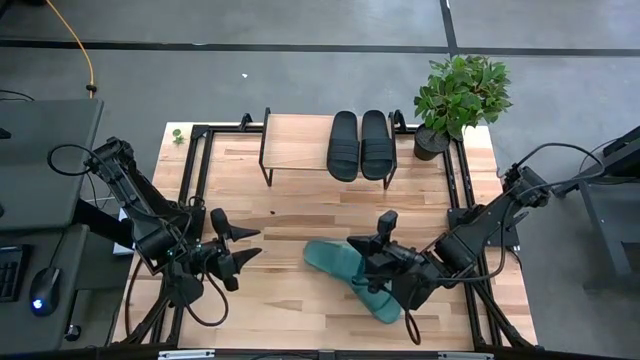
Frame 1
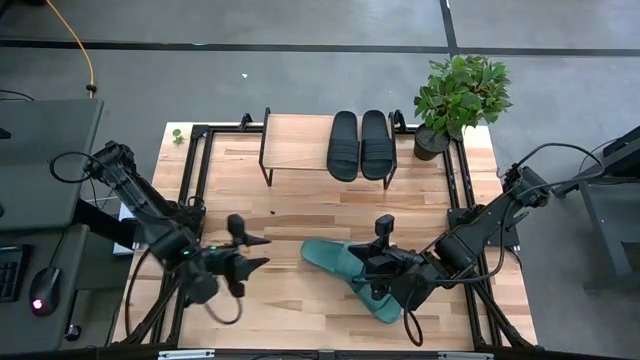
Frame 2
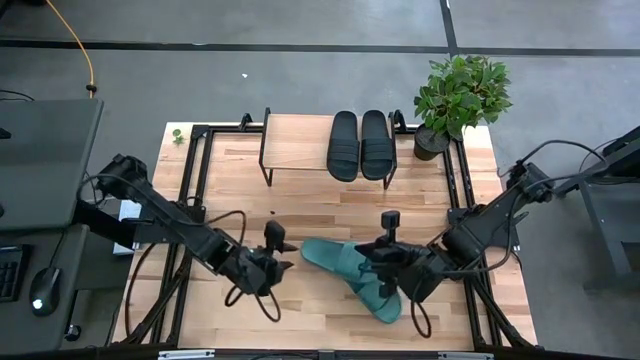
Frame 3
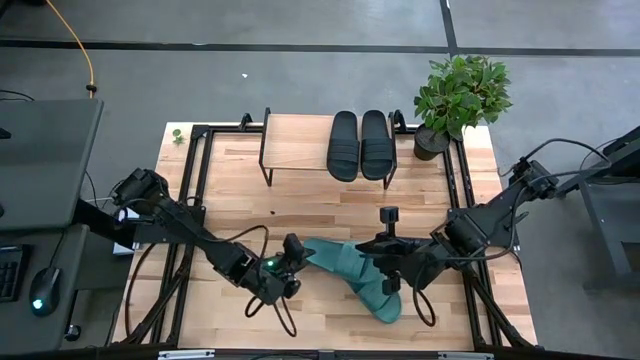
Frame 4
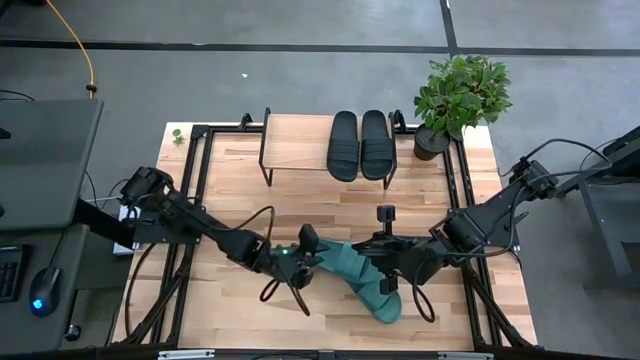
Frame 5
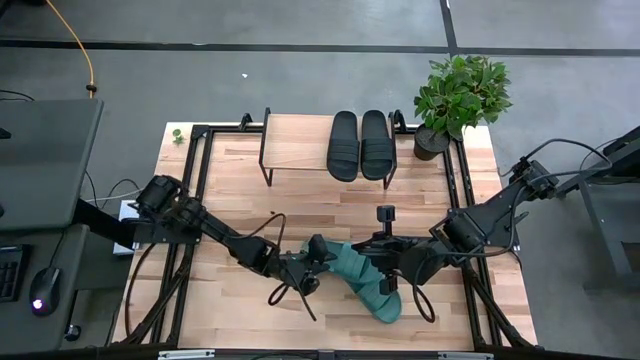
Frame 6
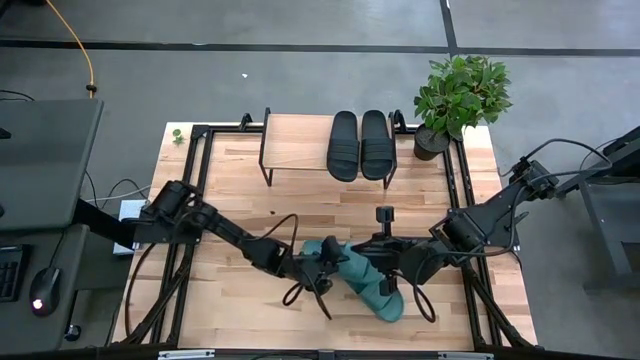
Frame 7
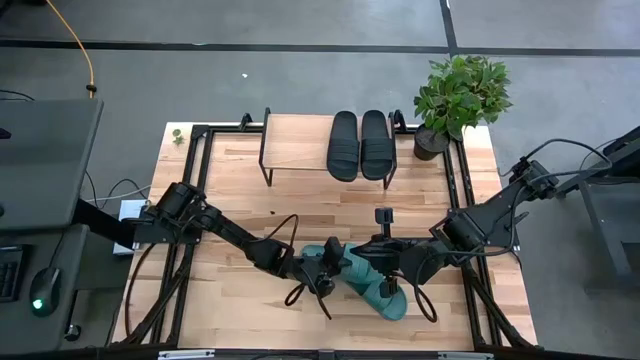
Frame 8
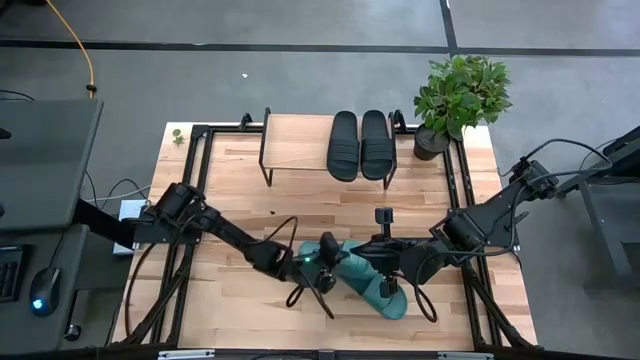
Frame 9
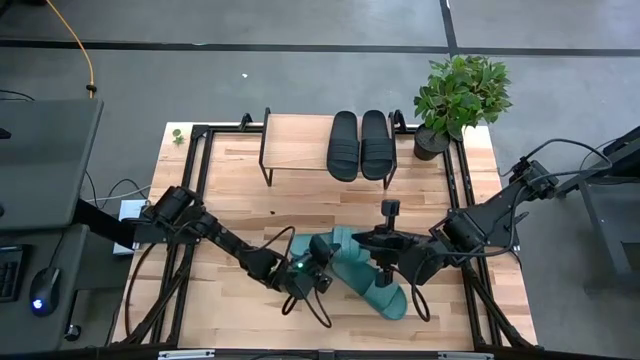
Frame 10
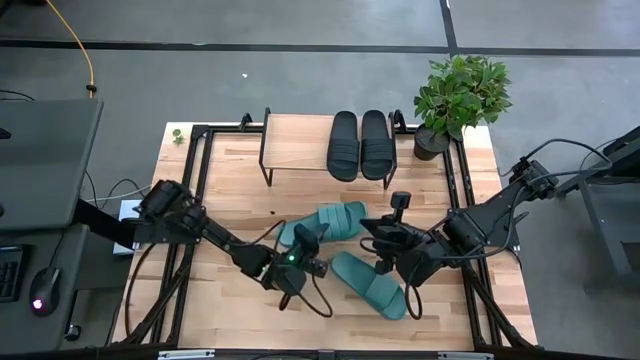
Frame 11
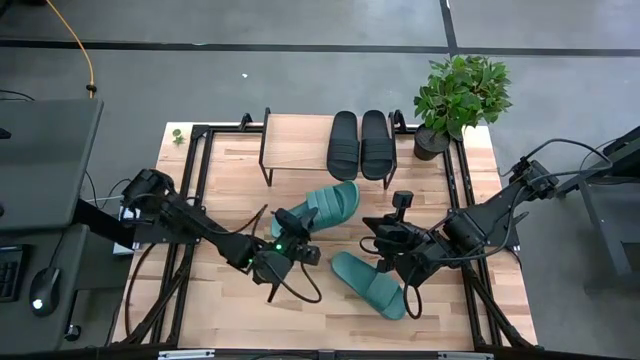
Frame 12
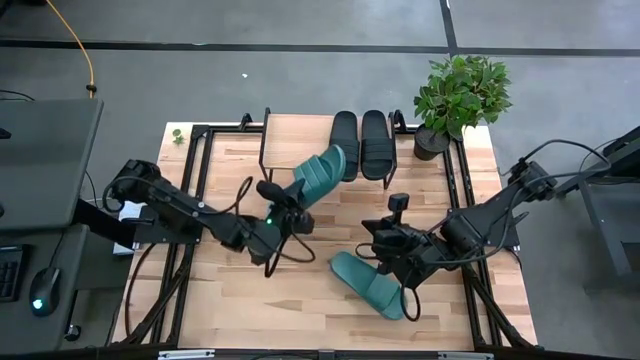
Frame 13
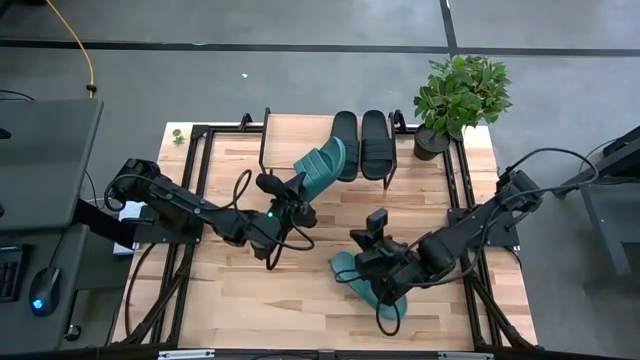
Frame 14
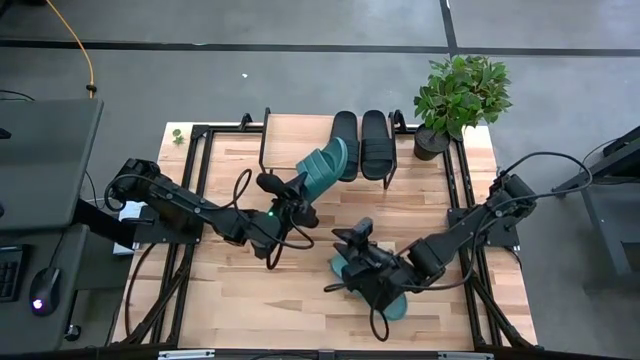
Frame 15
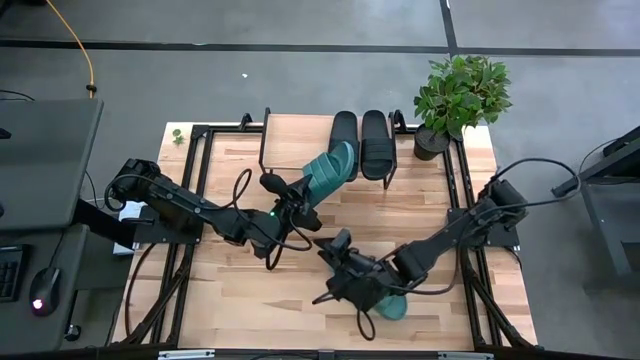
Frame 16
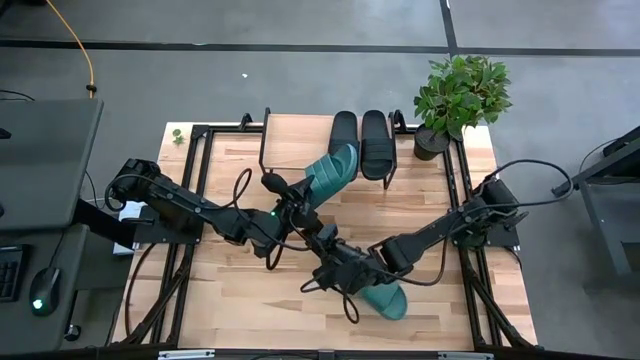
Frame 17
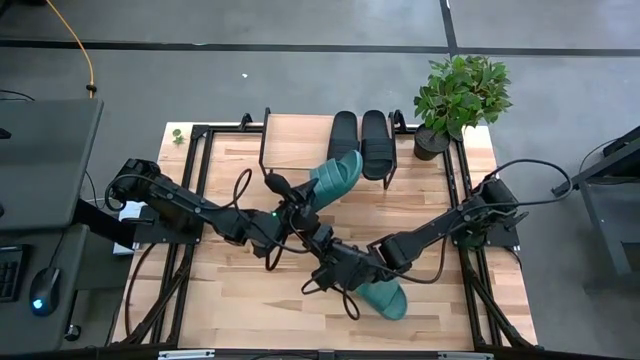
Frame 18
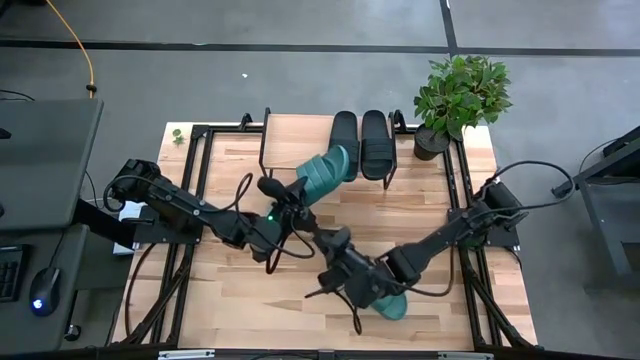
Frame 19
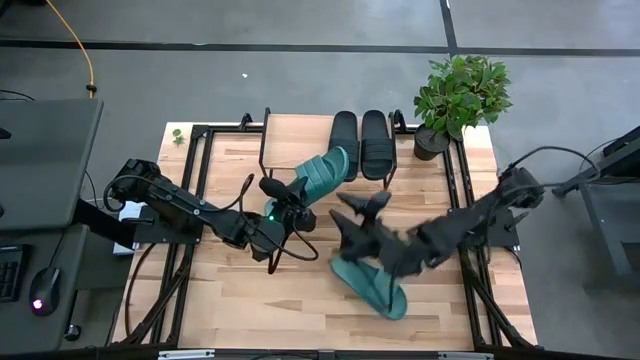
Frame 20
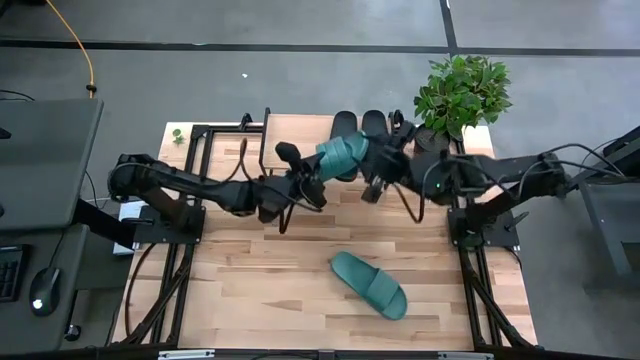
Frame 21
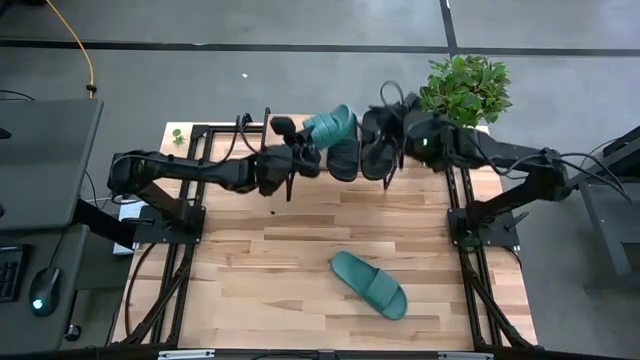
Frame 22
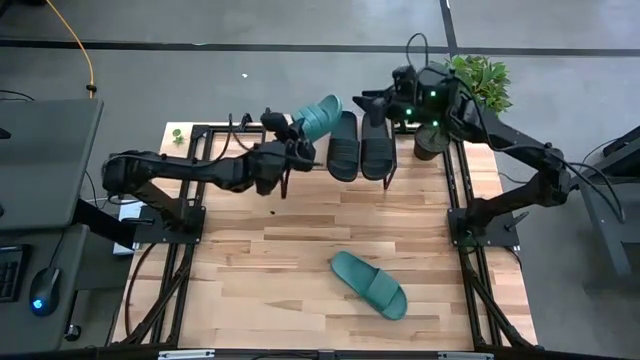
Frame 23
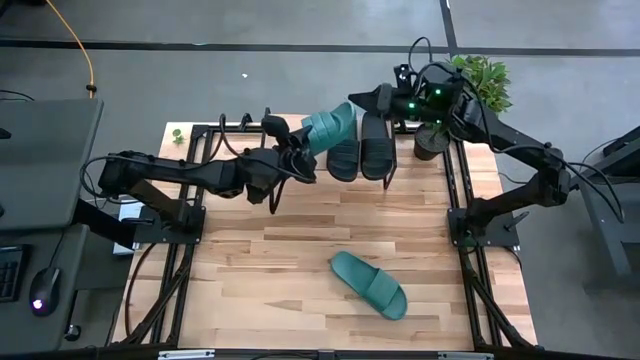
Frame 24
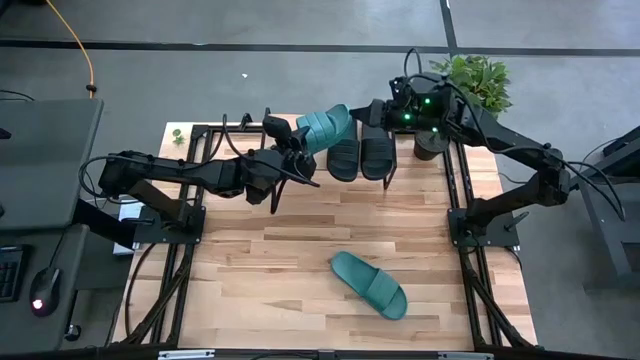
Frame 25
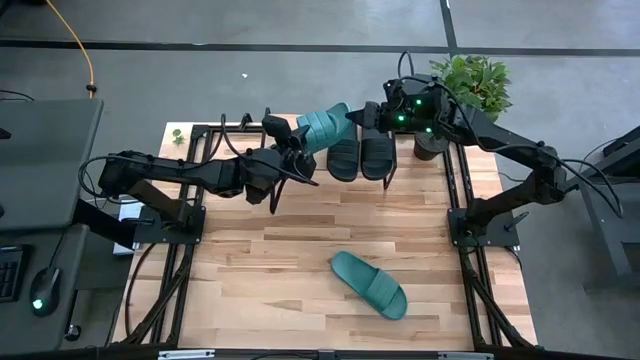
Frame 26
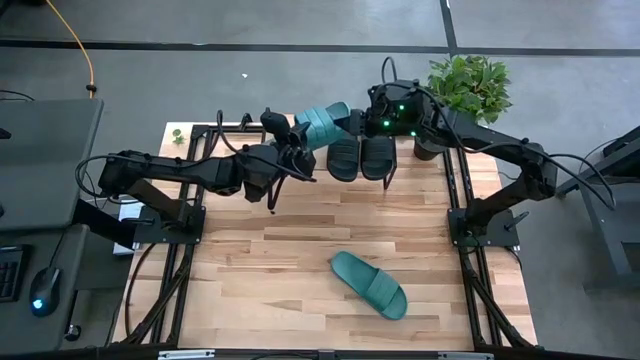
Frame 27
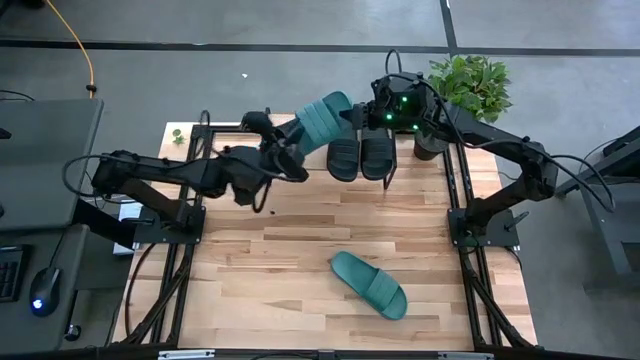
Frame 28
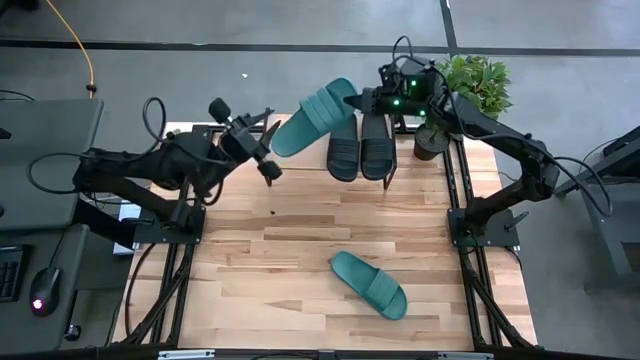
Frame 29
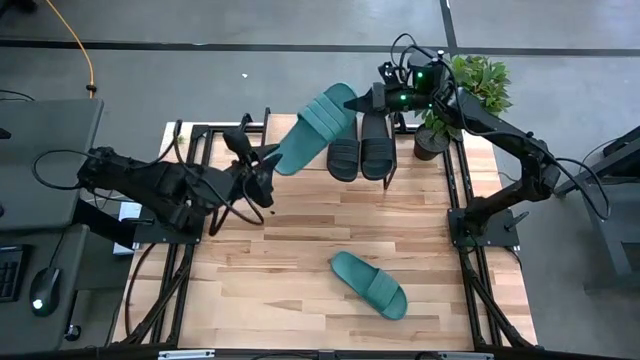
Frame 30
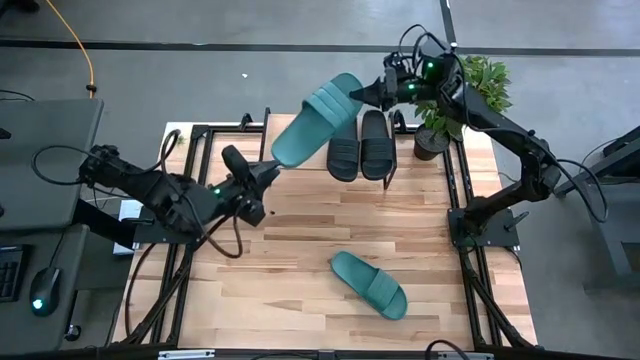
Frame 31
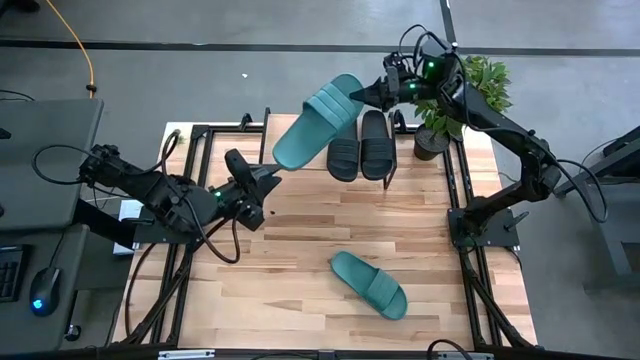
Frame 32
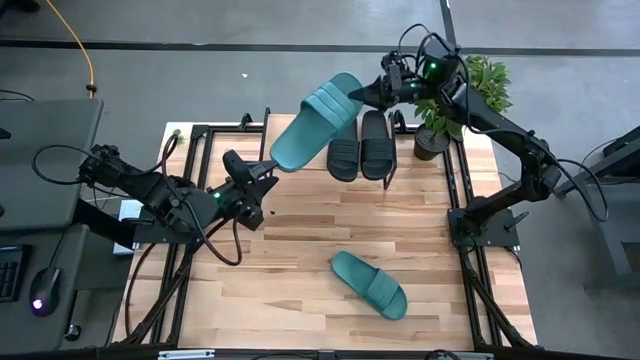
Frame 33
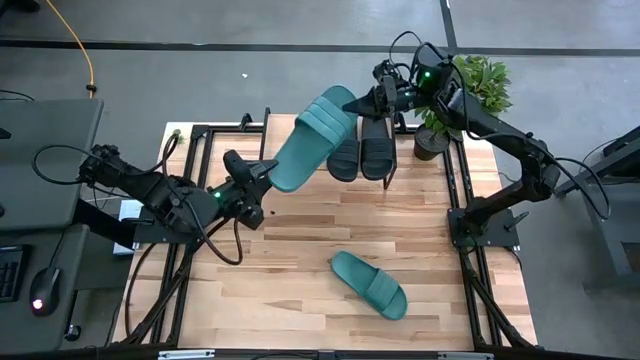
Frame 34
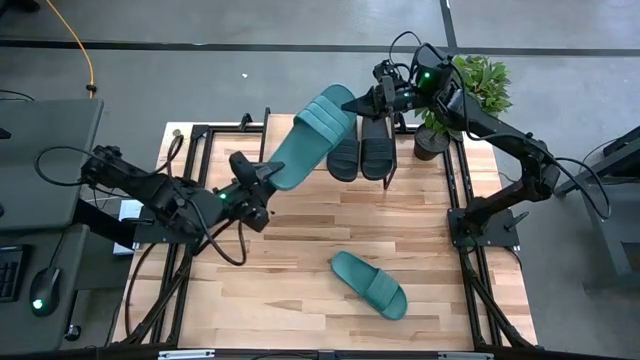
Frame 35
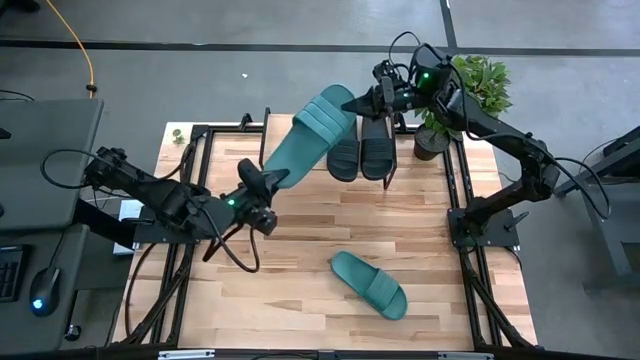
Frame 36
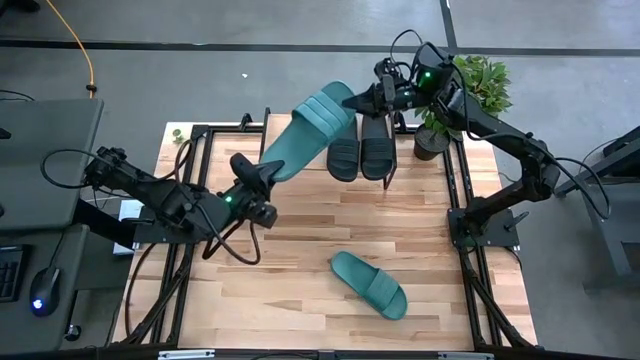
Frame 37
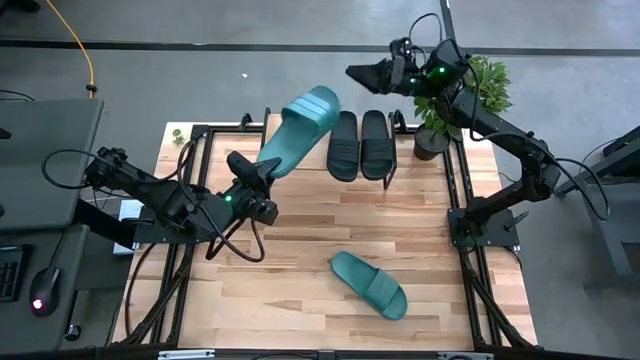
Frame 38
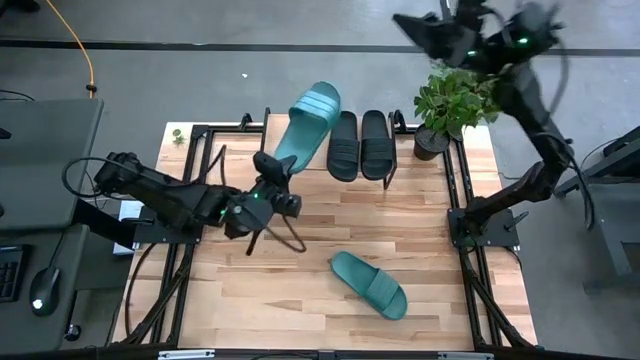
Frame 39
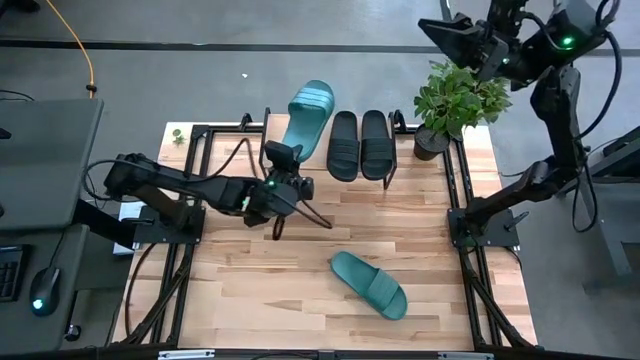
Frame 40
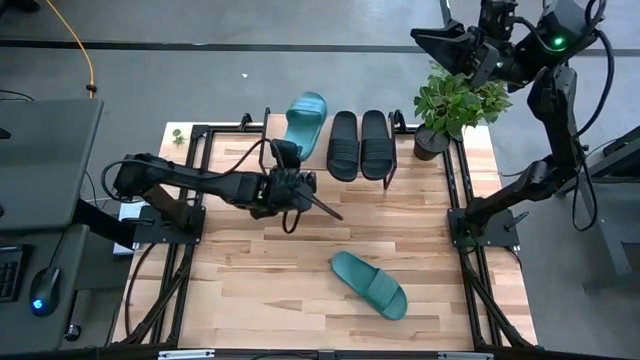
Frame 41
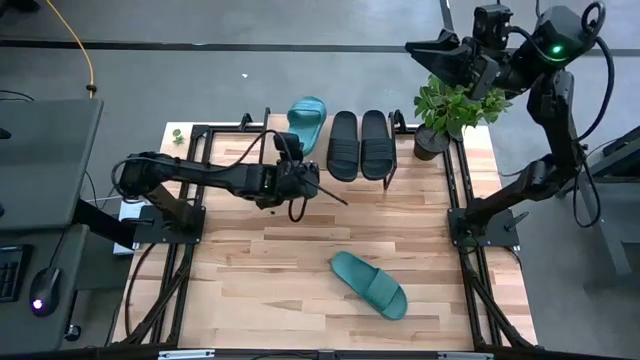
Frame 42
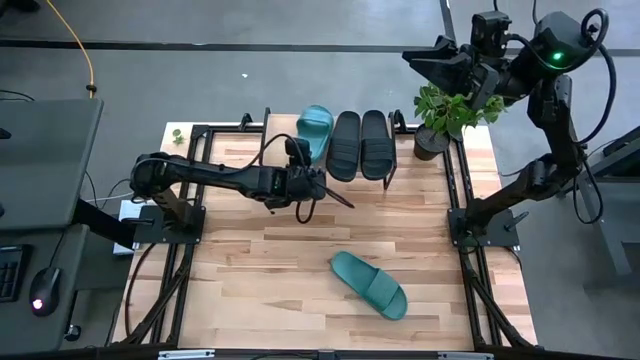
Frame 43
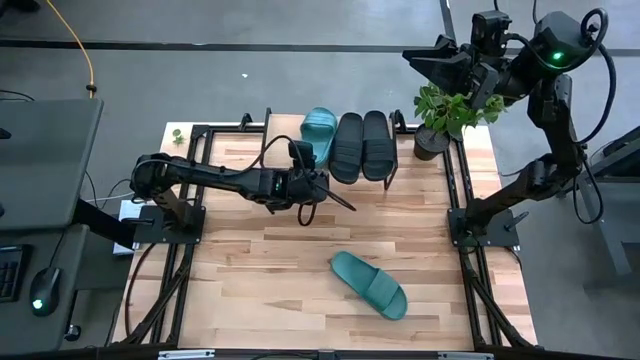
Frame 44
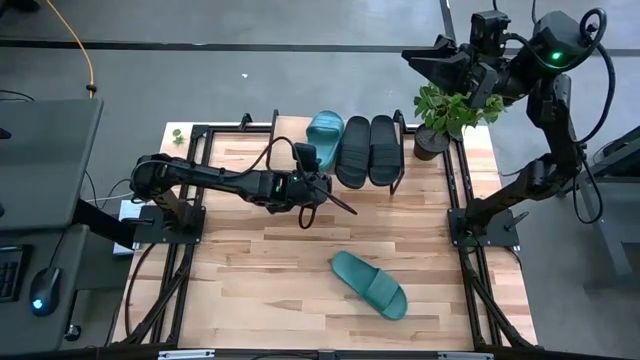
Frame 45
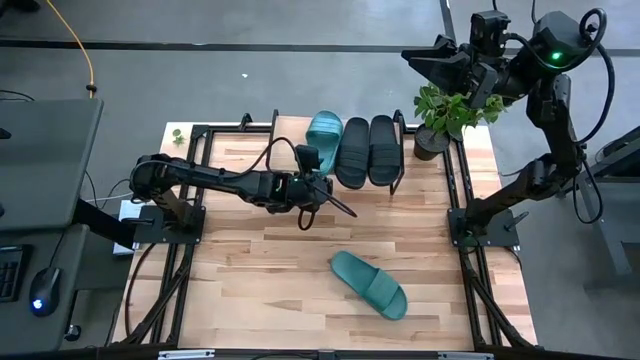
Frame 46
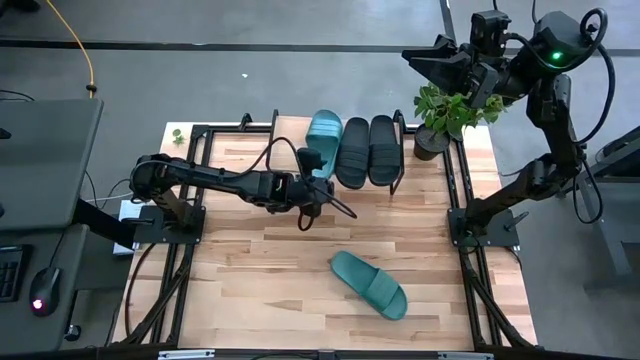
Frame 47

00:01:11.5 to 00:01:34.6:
Task: Pick and place slides into the shelf
Put the left green slipper on the shelf
